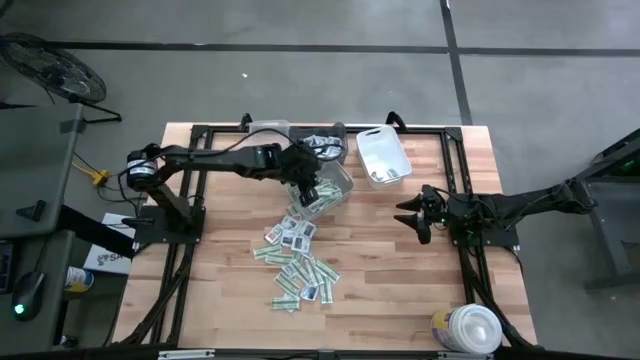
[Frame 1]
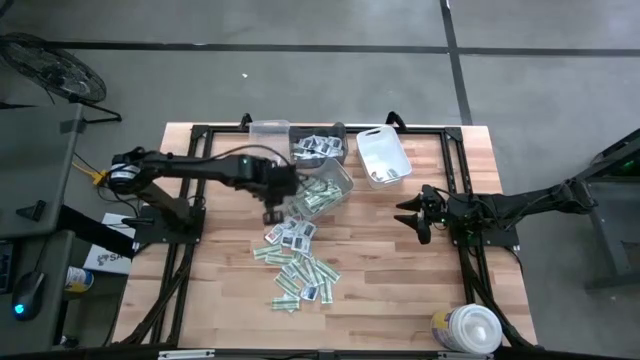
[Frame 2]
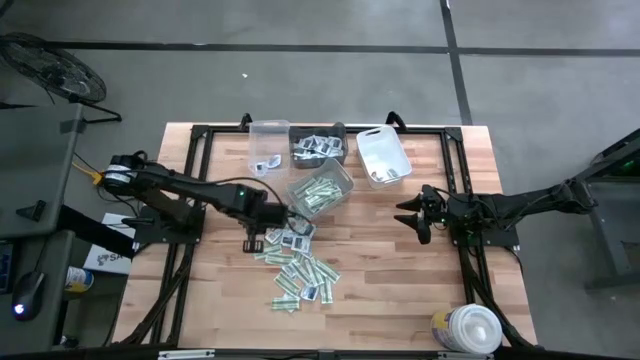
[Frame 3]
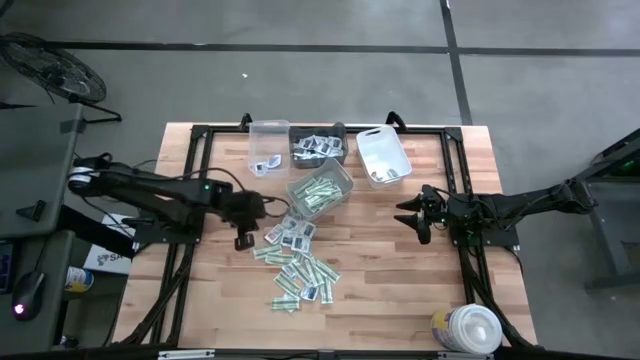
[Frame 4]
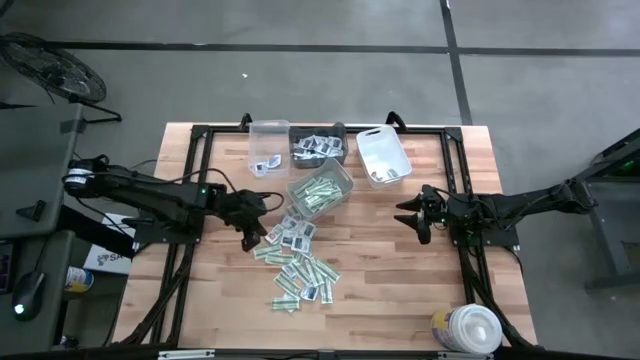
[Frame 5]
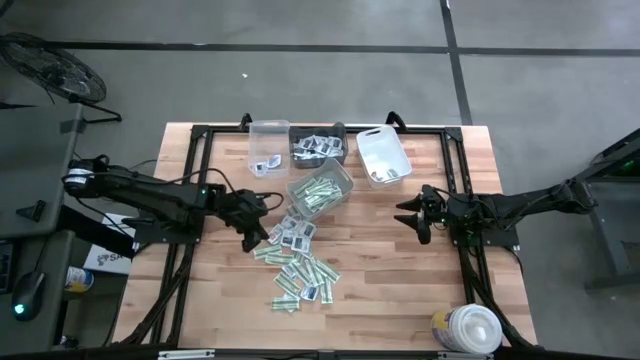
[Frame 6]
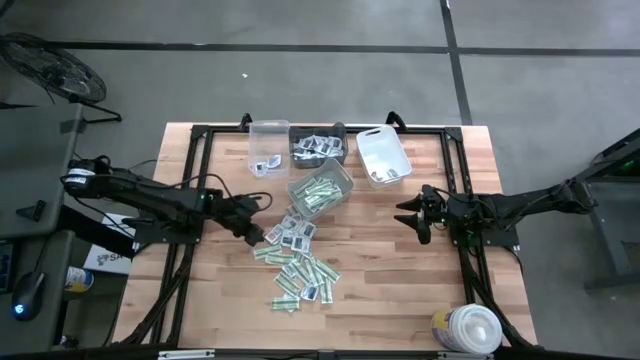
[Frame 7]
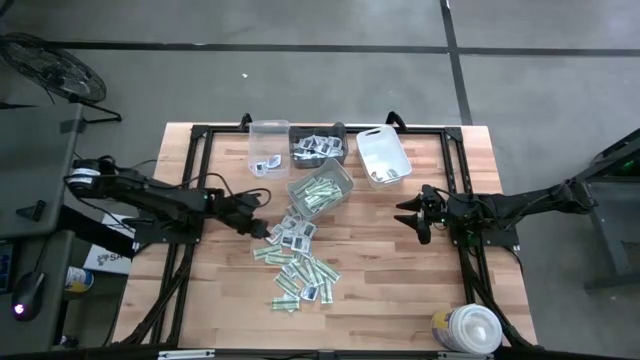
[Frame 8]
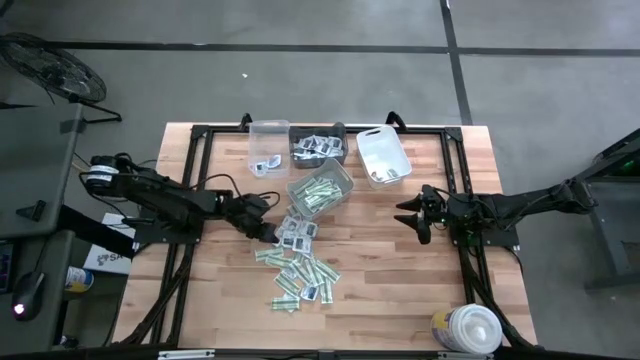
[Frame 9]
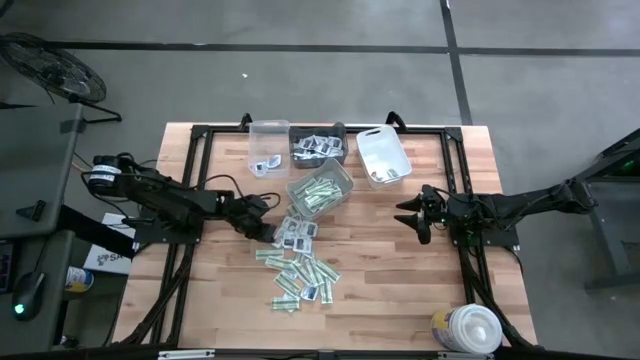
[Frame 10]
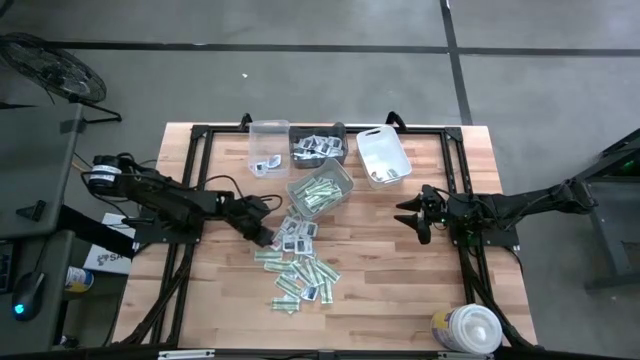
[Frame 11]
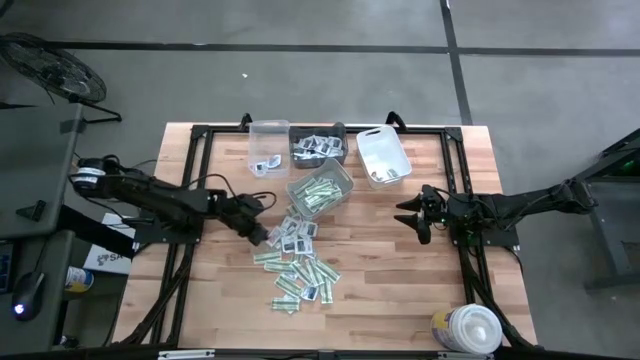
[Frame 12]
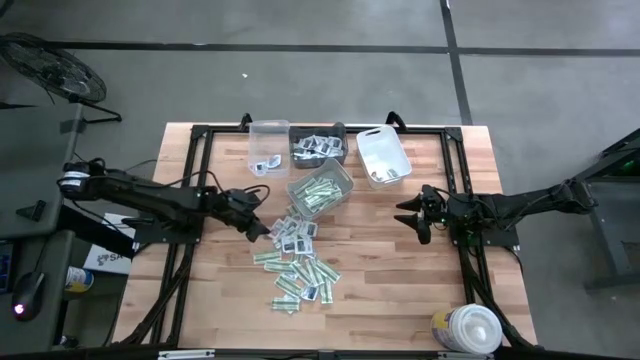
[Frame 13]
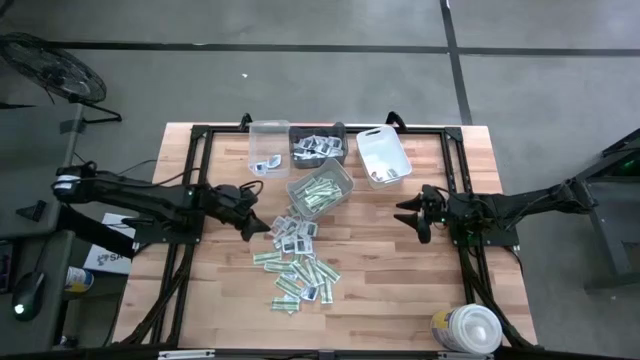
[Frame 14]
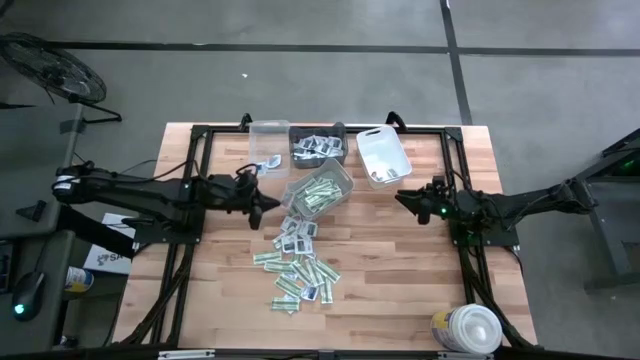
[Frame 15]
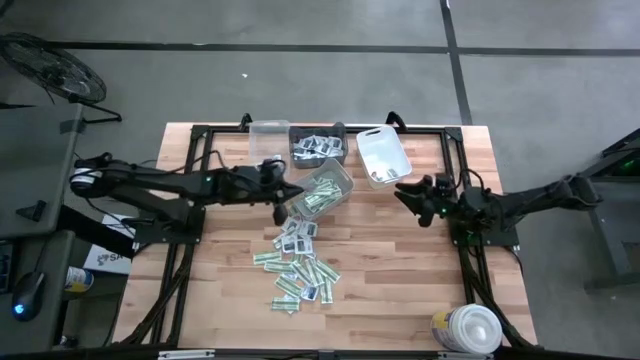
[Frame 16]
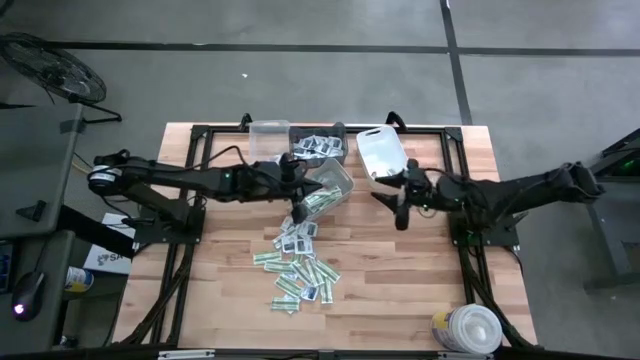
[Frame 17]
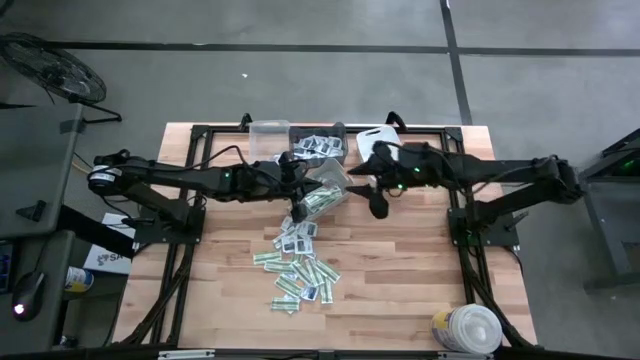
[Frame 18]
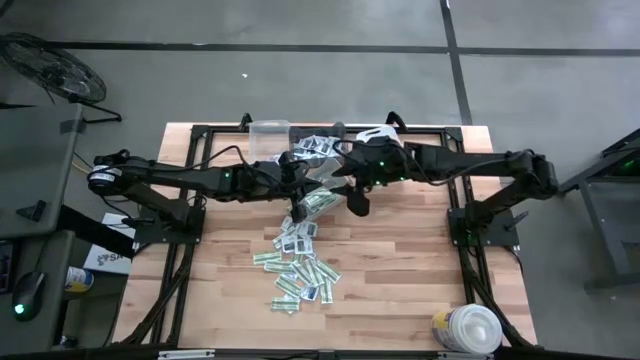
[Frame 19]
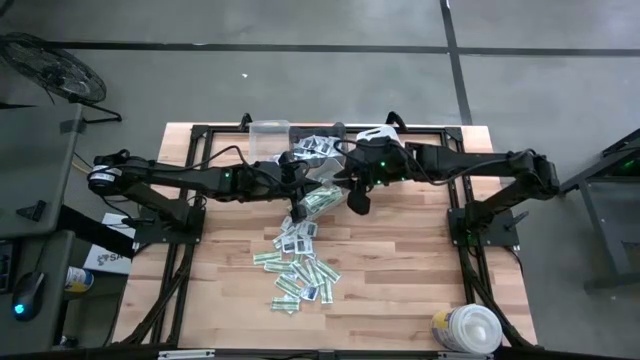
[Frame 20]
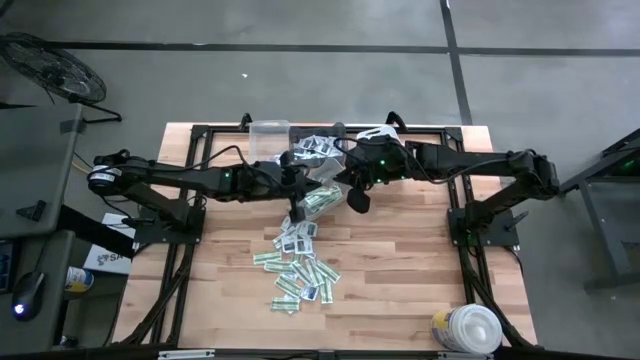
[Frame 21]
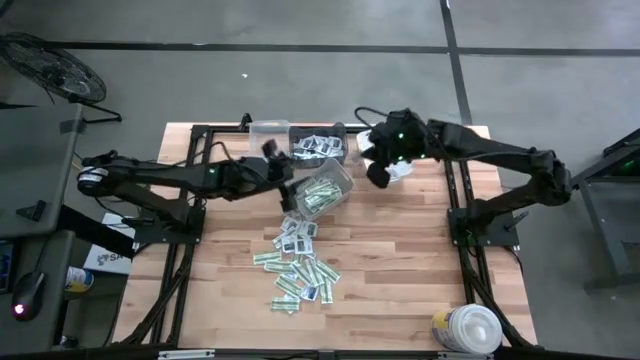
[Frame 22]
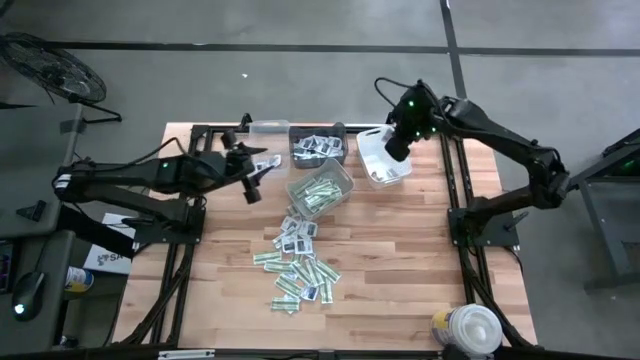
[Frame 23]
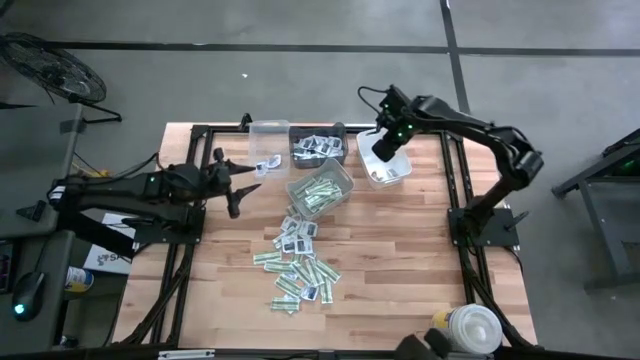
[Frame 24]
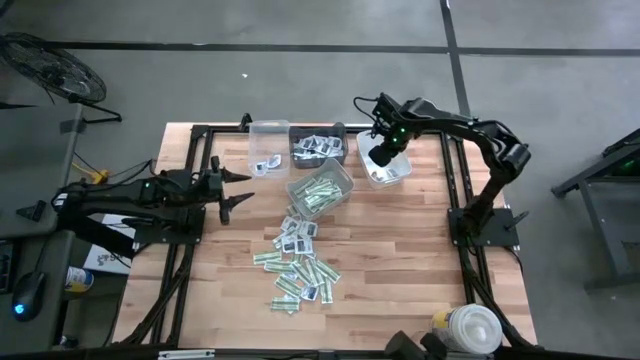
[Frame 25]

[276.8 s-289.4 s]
Task: Pick & Place First Aid Supplies
Put the ointment pack into the white bin

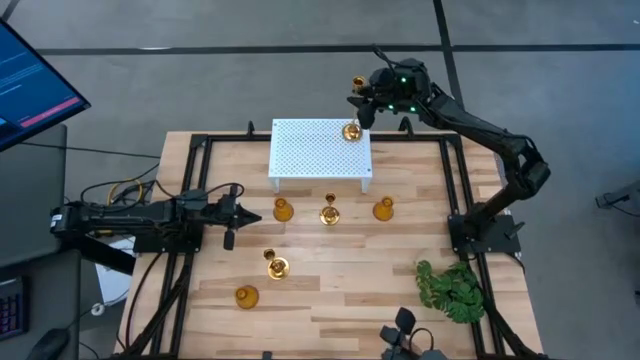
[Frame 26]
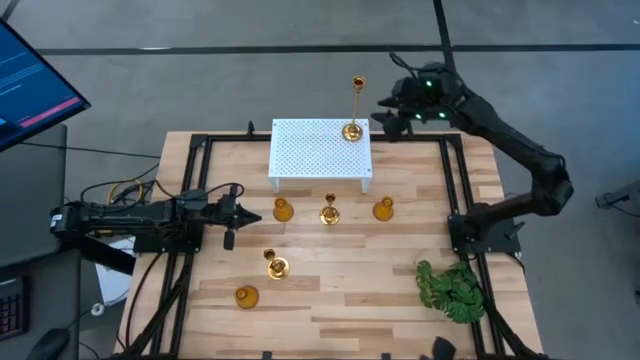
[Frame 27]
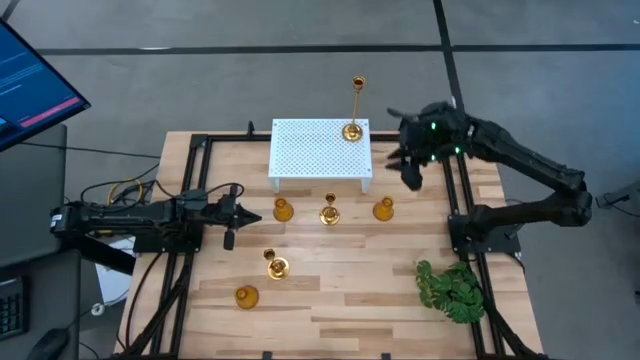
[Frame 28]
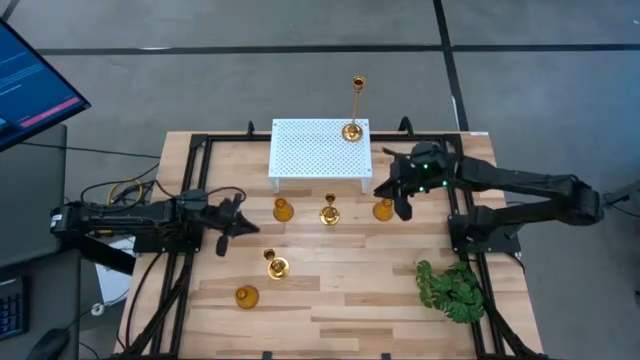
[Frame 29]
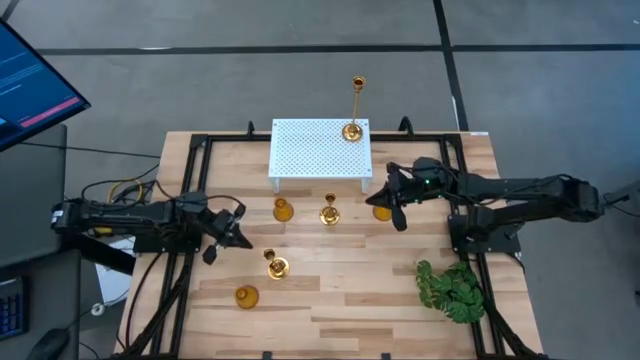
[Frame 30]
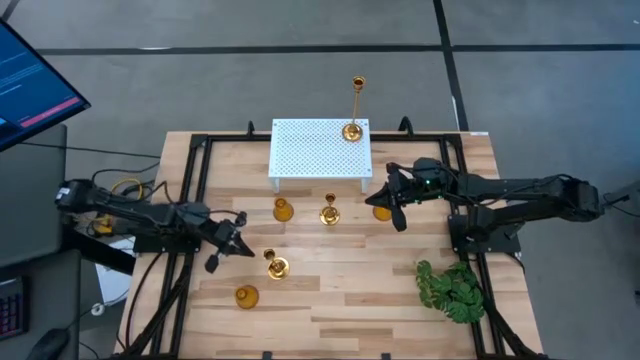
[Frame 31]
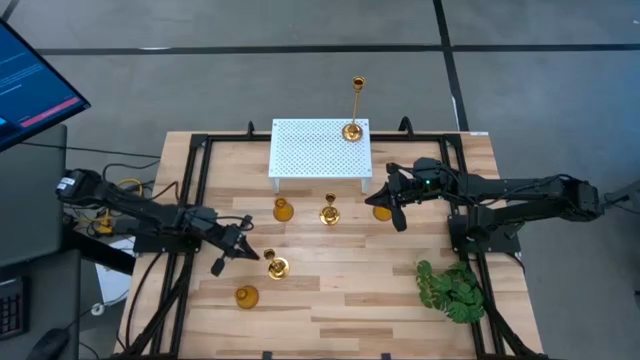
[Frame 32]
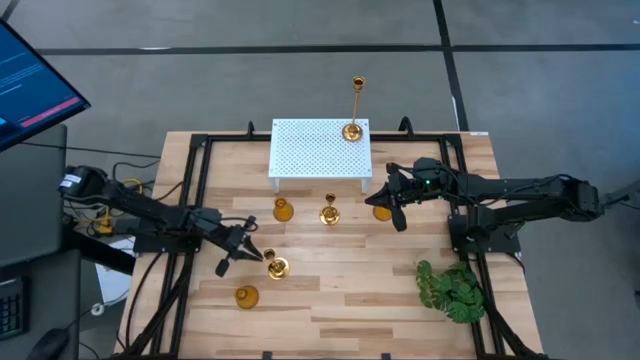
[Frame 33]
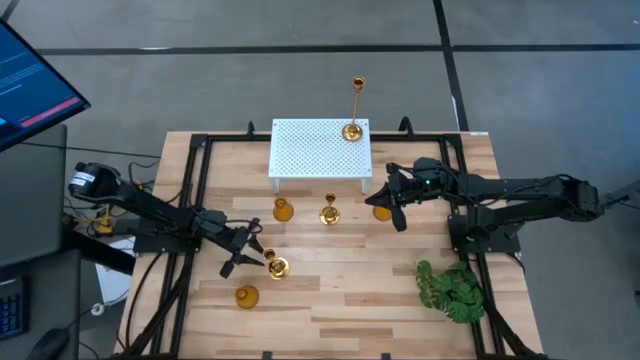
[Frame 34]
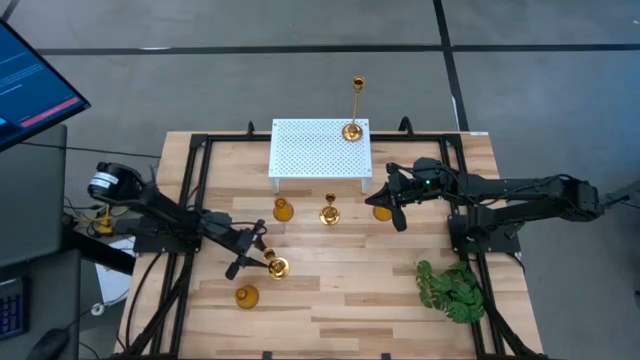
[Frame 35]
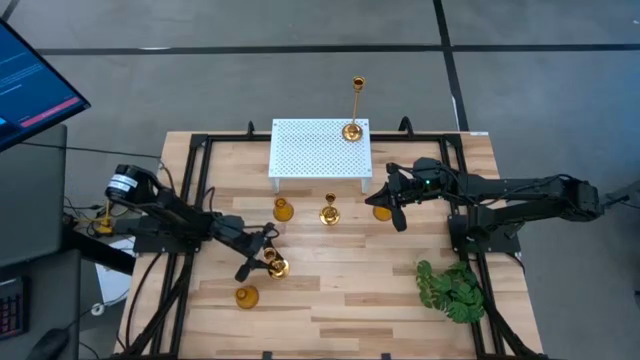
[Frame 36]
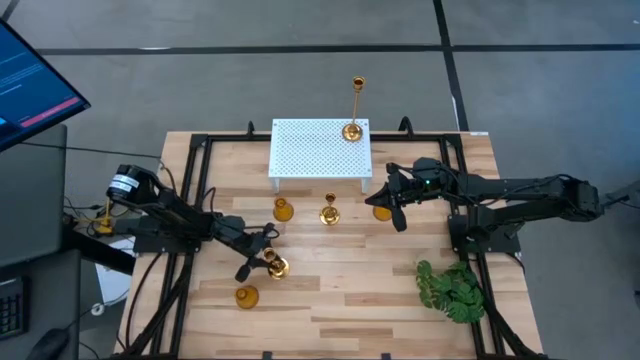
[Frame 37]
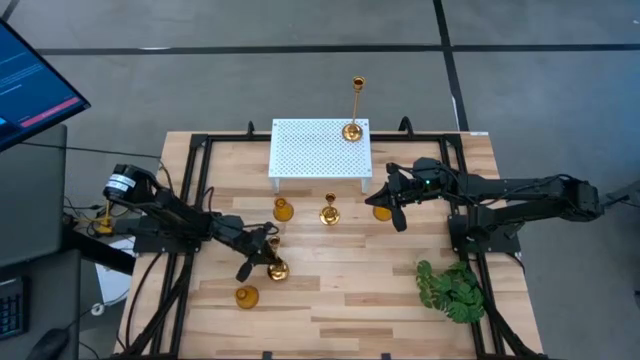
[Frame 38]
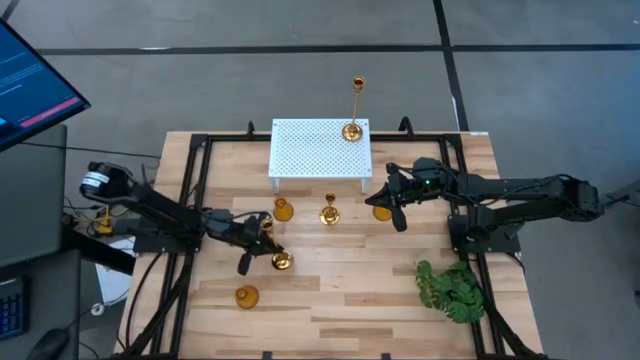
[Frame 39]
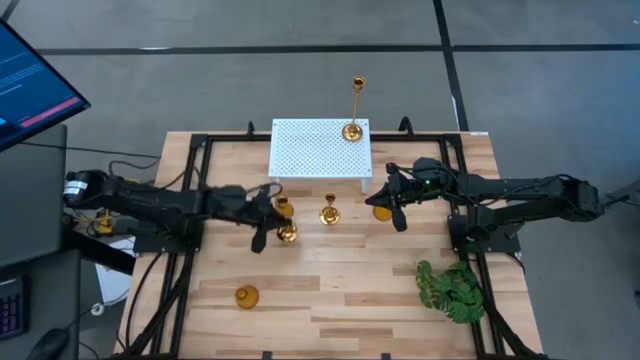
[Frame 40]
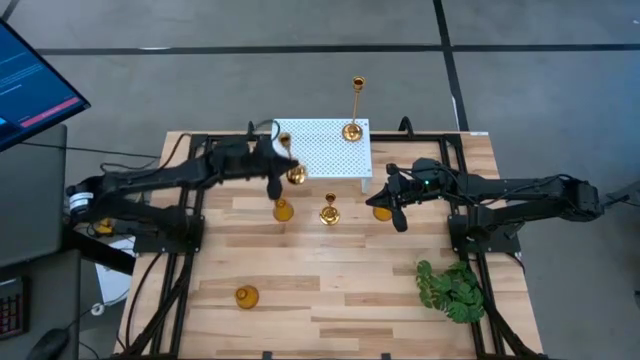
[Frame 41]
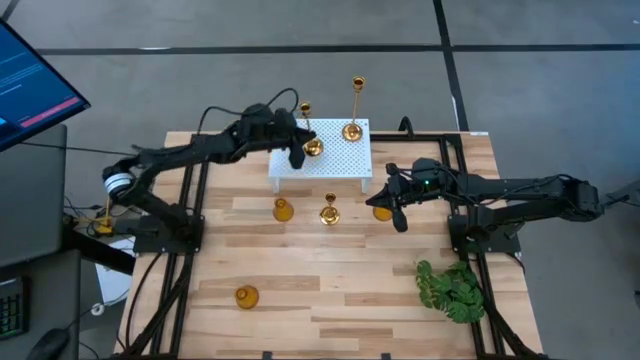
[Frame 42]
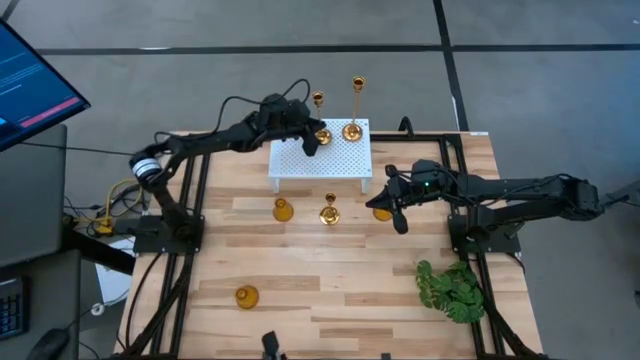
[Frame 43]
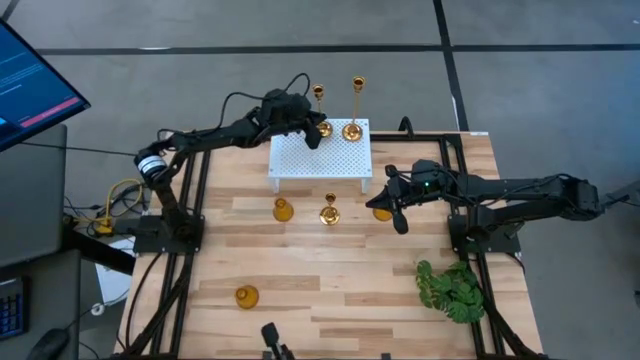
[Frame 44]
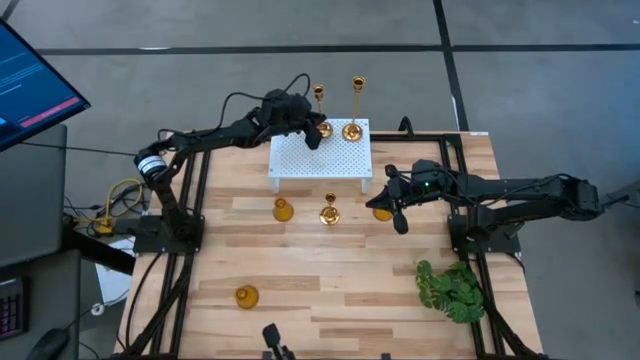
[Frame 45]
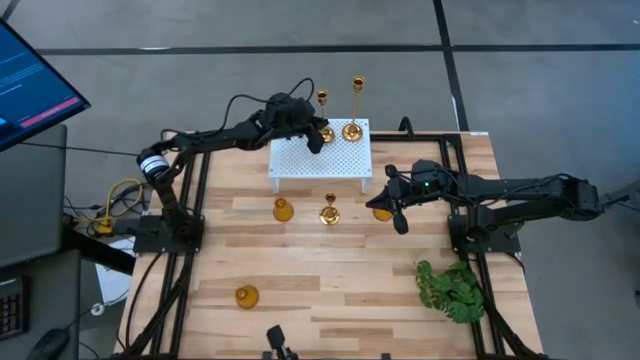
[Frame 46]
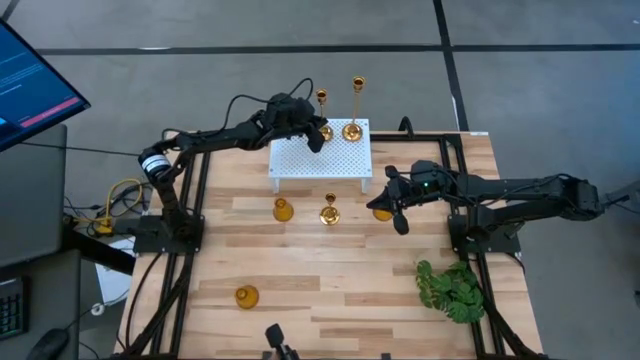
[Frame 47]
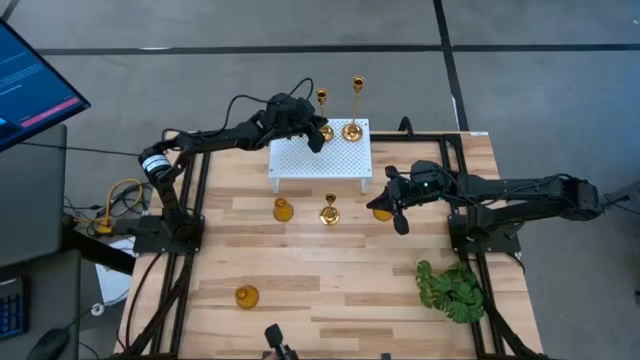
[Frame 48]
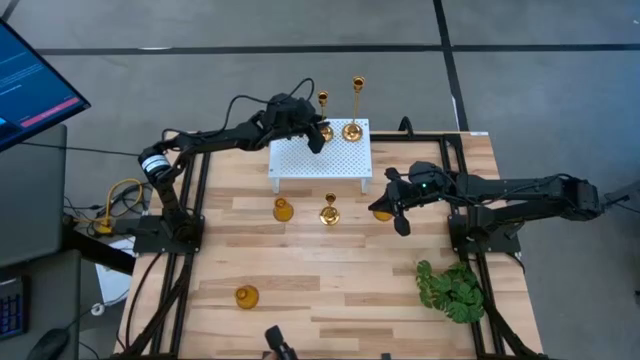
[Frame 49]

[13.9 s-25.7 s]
Task: Pick & Place candle stick holders
Put the medium gold candle holder on the shelf
